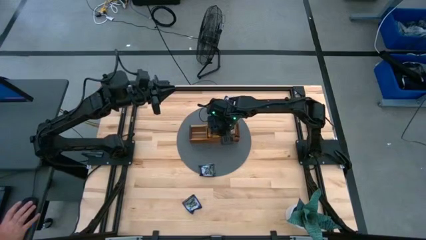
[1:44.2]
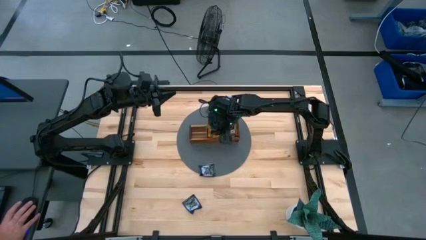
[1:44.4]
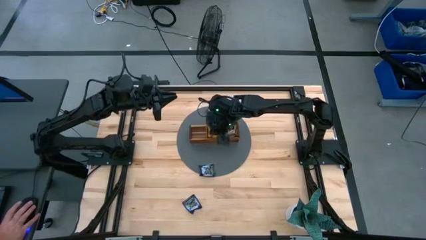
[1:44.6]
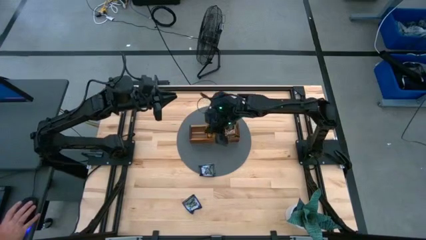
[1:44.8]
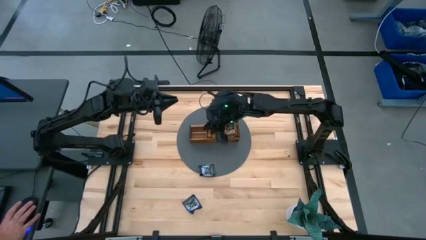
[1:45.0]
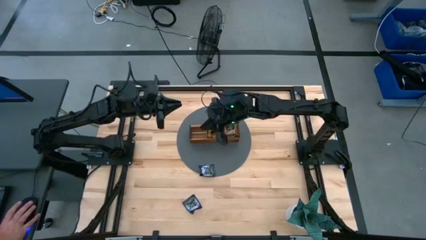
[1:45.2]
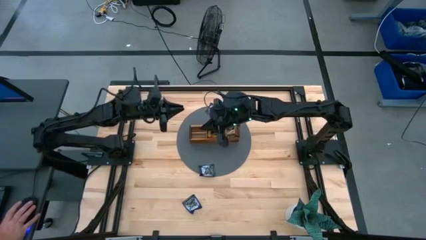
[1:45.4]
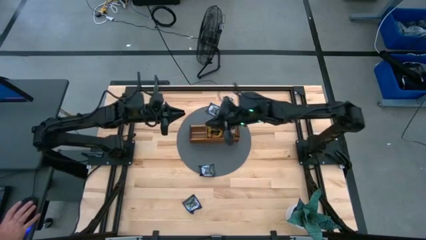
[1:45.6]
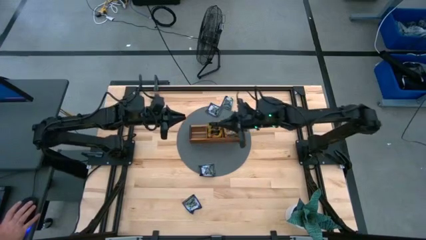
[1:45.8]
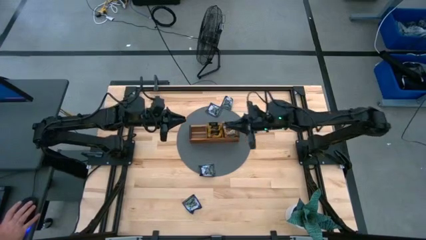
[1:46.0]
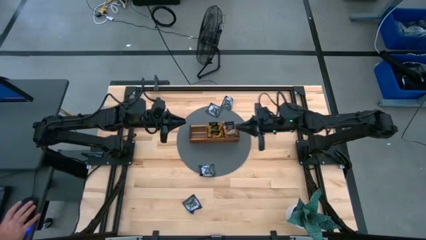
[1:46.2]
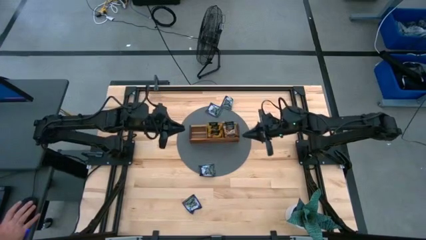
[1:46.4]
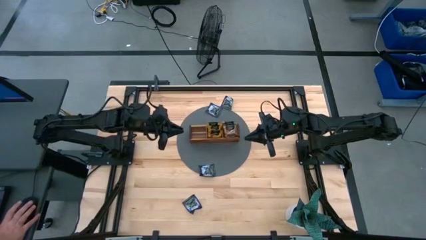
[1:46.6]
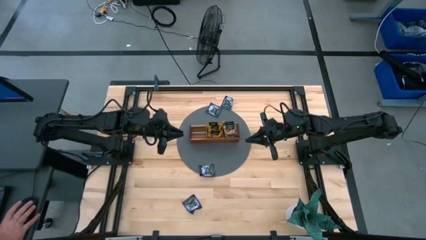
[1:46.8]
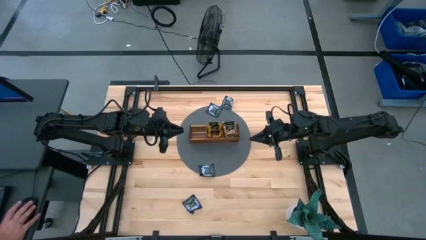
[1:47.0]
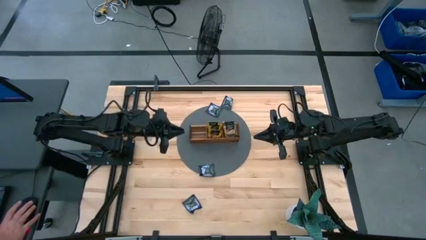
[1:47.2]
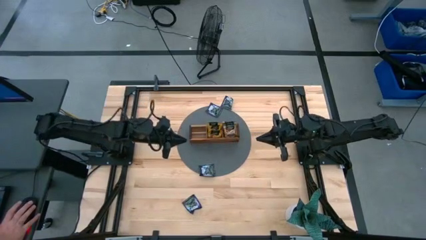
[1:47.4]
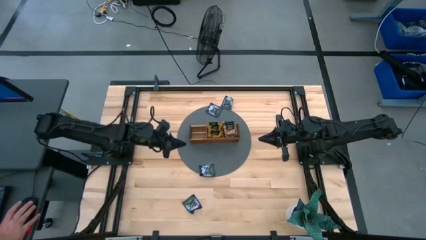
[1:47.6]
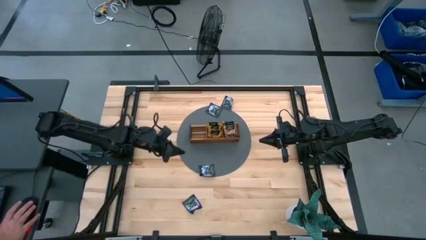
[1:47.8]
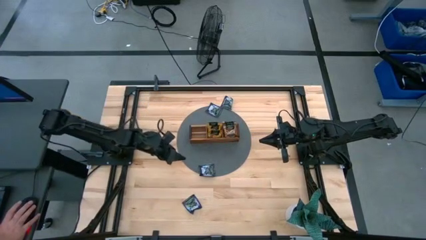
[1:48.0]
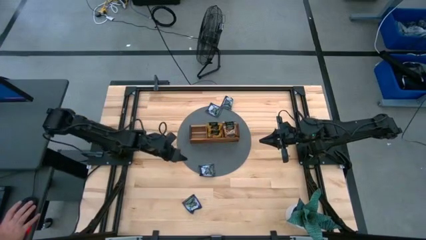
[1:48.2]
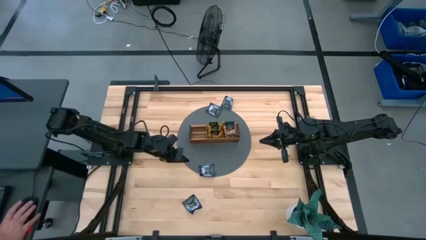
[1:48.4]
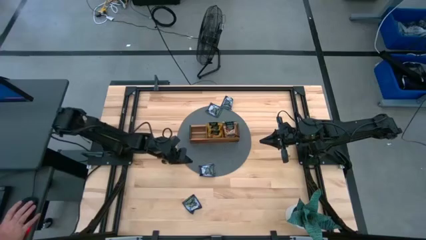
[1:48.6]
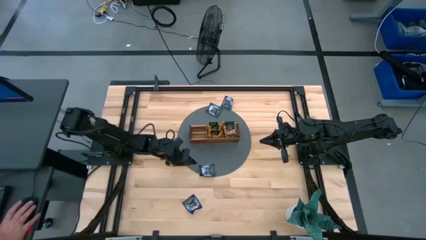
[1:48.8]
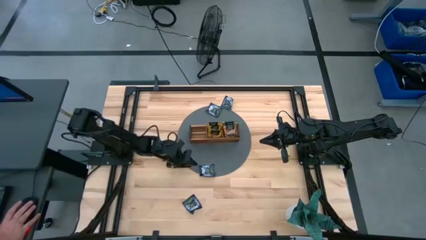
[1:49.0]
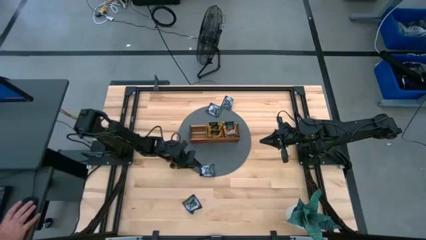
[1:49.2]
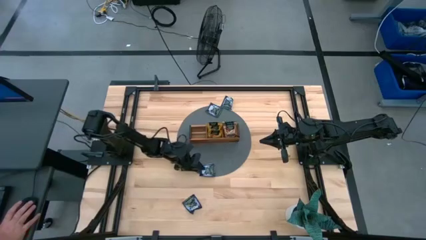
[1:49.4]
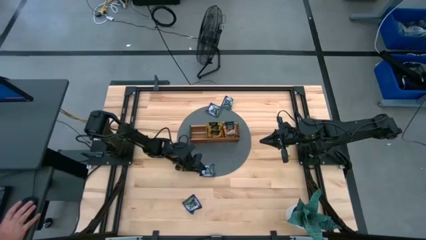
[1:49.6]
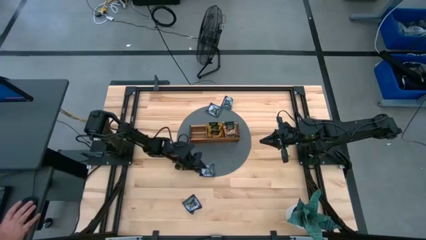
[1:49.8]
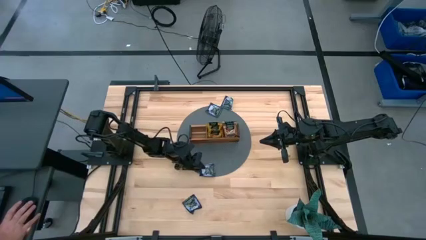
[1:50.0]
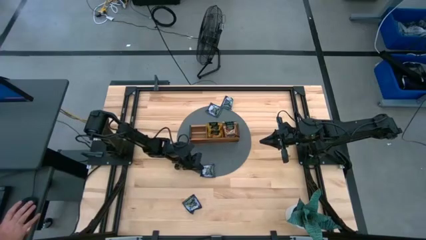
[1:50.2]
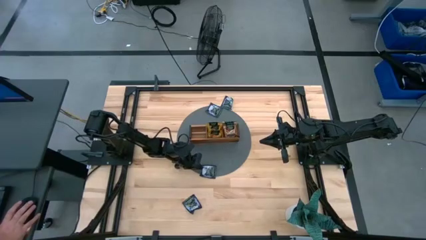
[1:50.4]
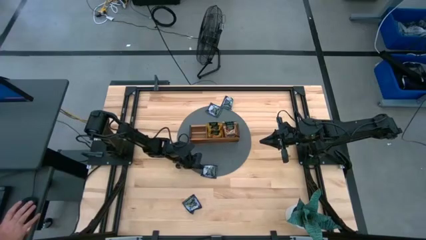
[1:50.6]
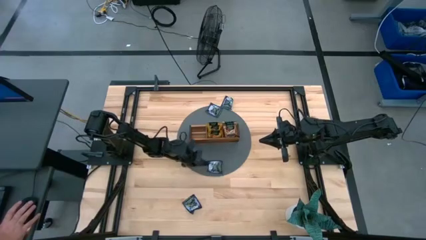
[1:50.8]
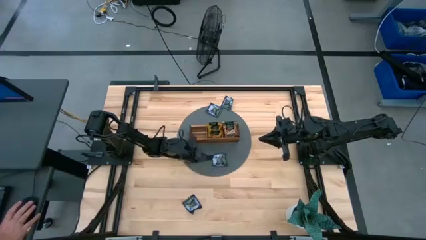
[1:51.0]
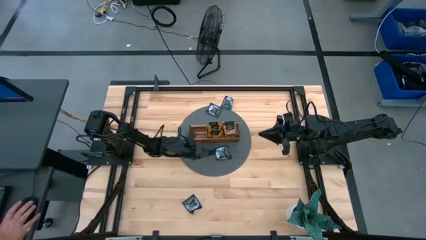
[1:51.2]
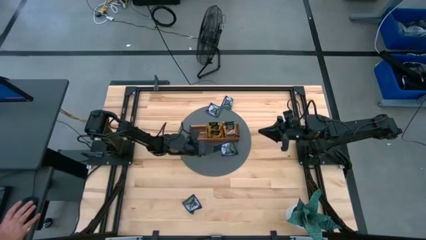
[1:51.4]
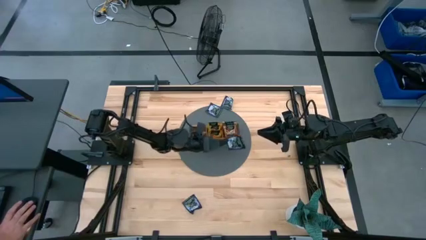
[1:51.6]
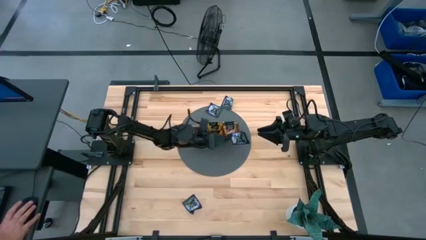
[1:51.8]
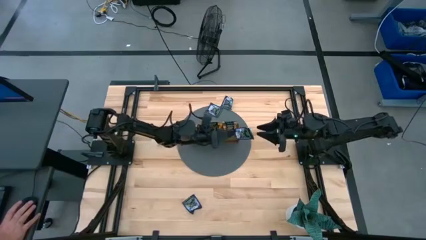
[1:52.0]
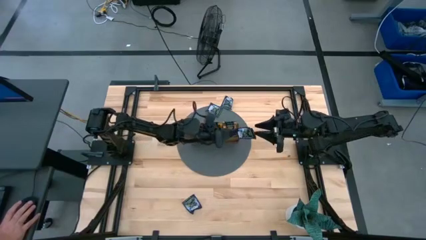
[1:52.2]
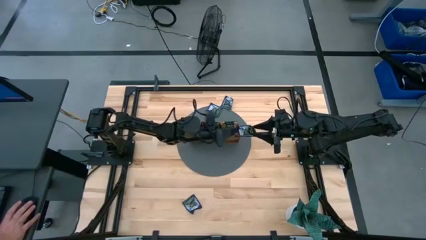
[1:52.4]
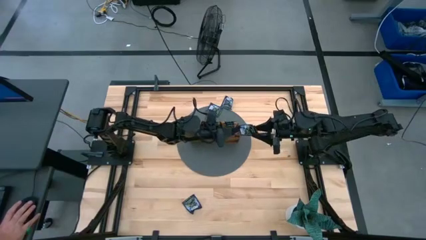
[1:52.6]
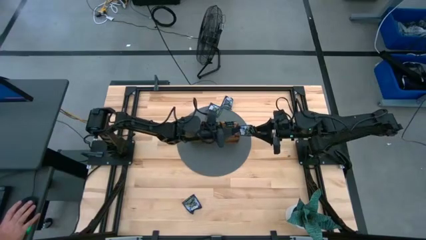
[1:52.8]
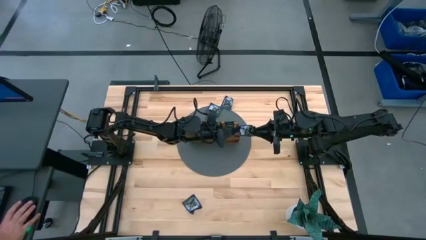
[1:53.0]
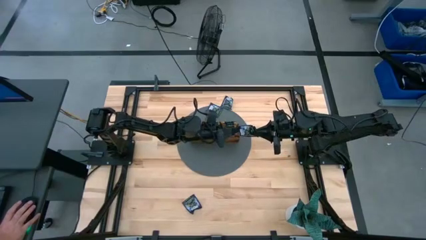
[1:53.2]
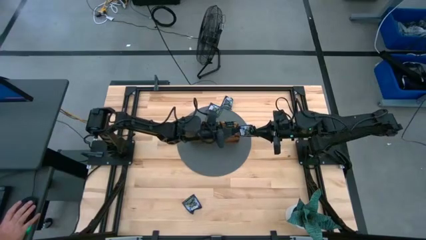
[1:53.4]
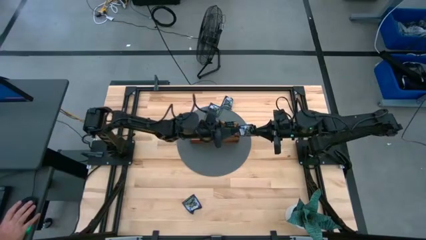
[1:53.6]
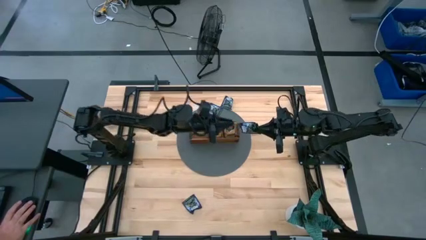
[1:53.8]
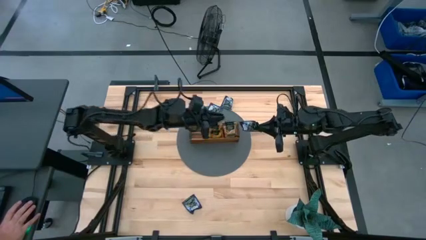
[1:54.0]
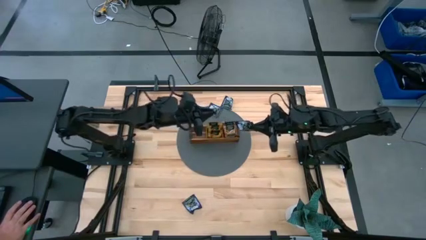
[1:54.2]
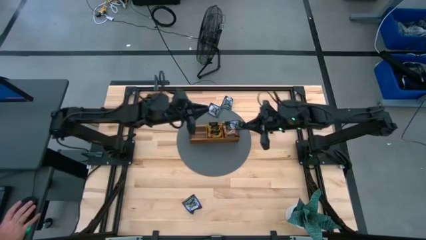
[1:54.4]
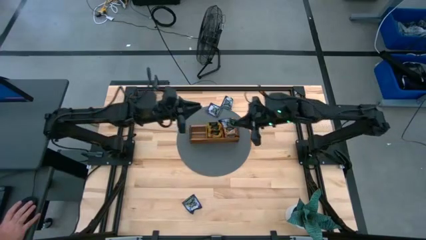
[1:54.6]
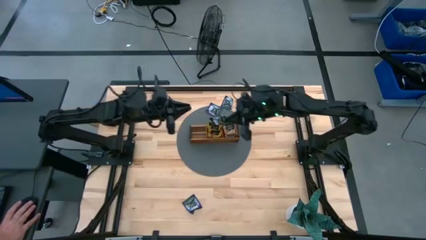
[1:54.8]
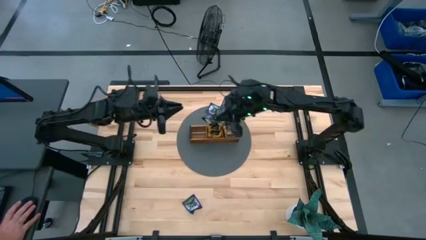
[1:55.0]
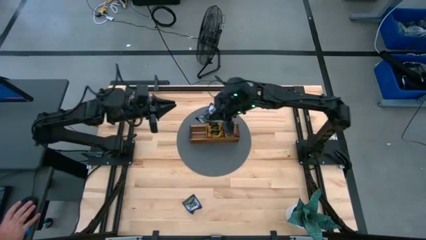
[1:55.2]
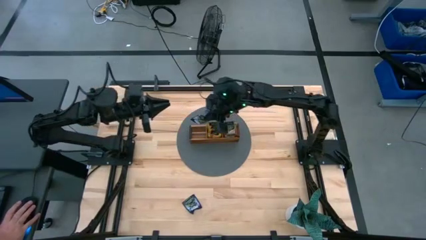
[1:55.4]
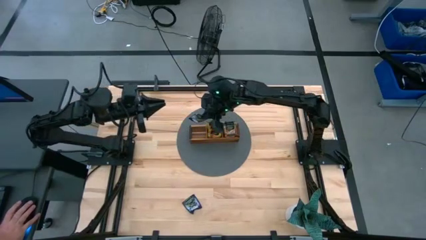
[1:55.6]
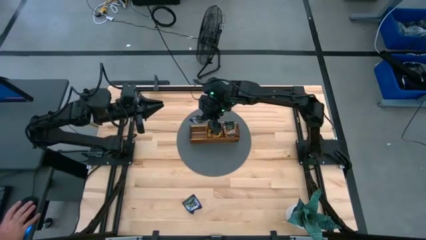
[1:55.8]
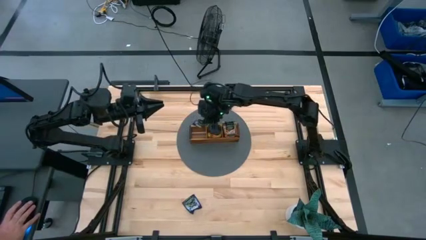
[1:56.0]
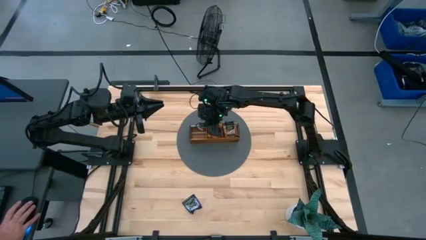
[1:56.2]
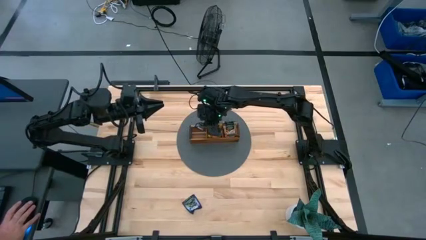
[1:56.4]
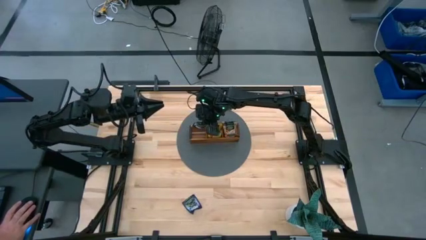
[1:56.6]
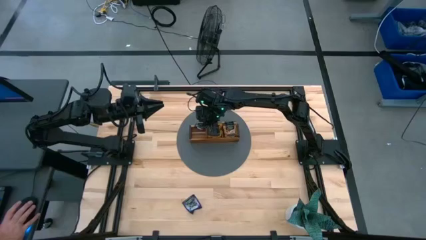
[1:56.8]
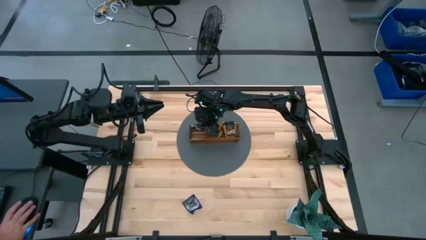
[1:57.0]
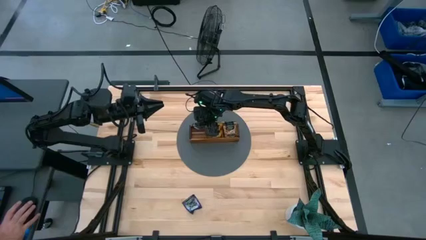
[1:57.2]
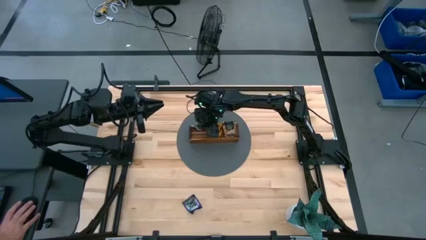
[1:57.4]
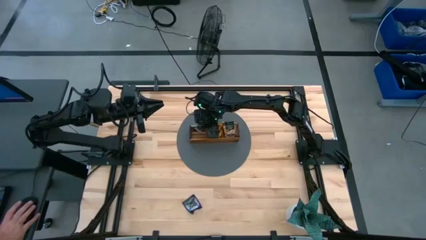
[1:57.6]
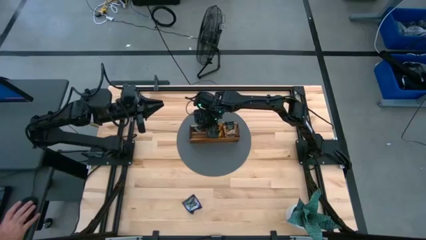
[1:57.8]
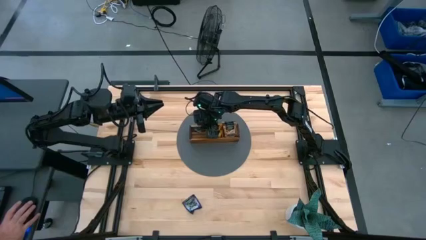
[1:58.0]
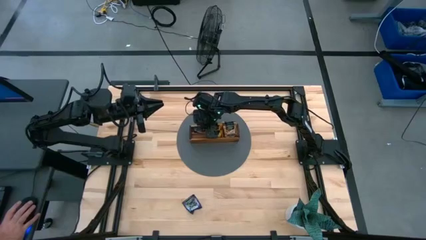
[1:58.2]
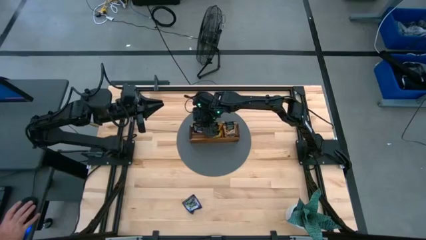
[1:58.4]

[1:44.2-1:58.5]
Task: Pick & Place Tea
Put the violet tea bag into the left section of the wooden organizer
